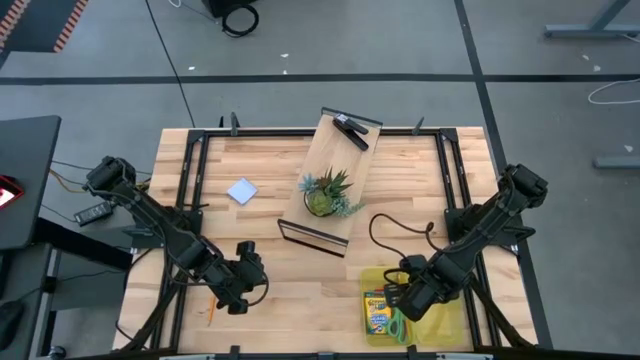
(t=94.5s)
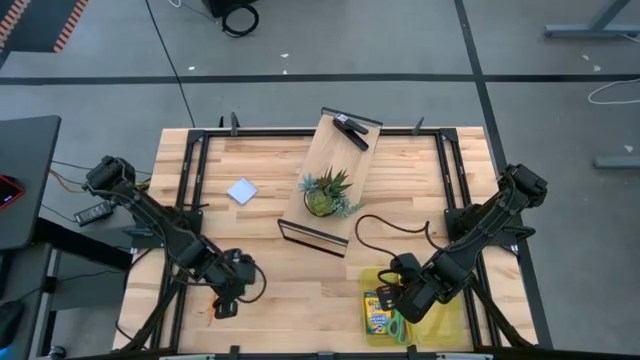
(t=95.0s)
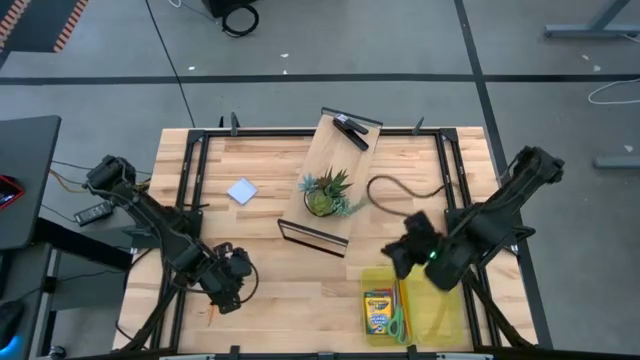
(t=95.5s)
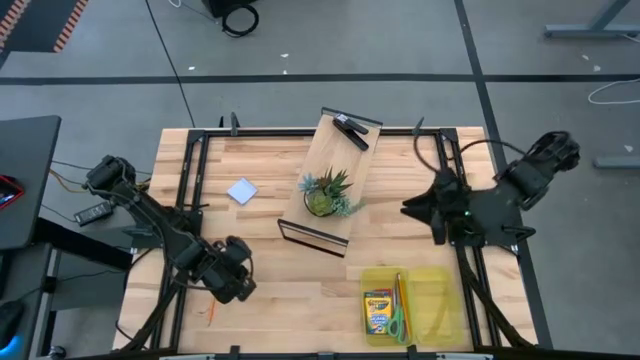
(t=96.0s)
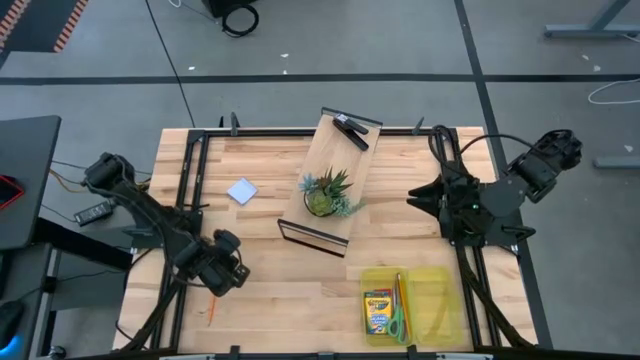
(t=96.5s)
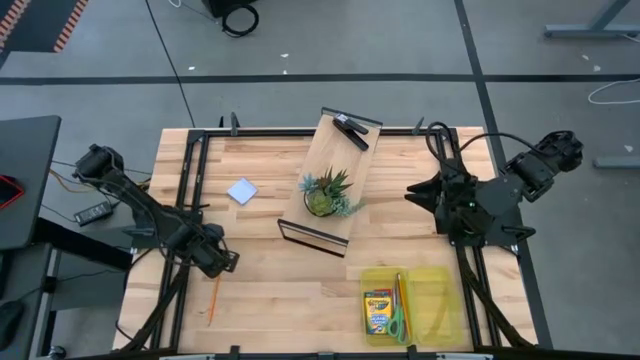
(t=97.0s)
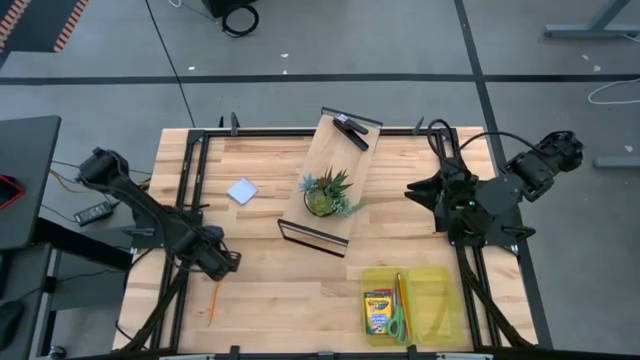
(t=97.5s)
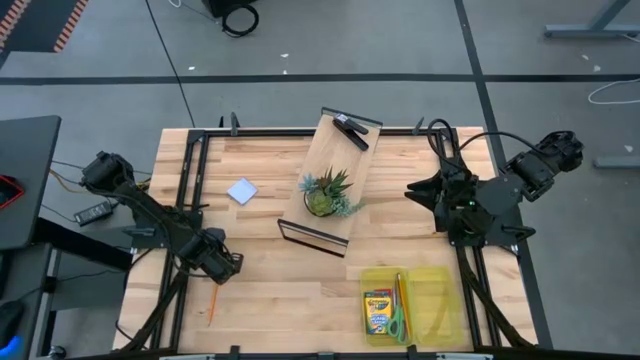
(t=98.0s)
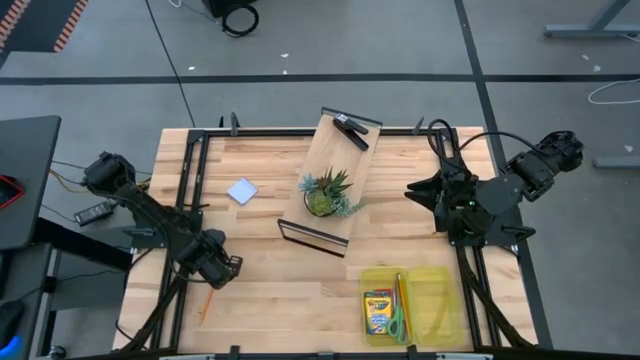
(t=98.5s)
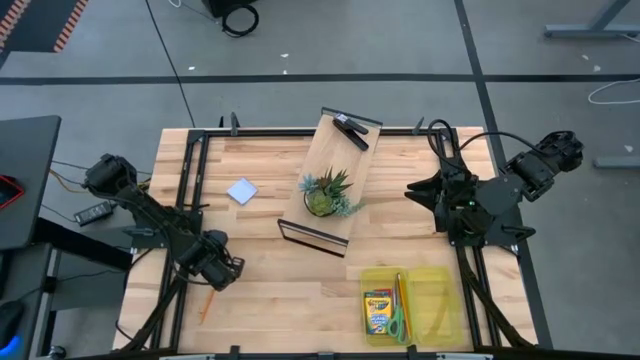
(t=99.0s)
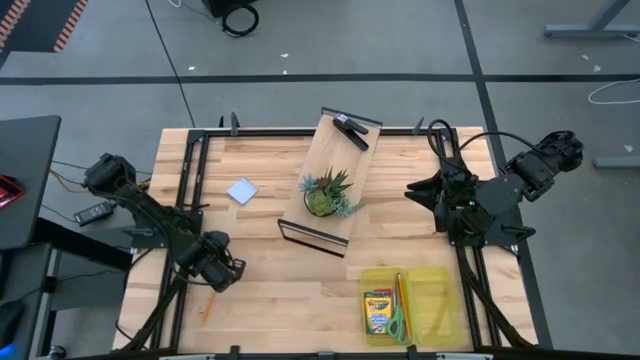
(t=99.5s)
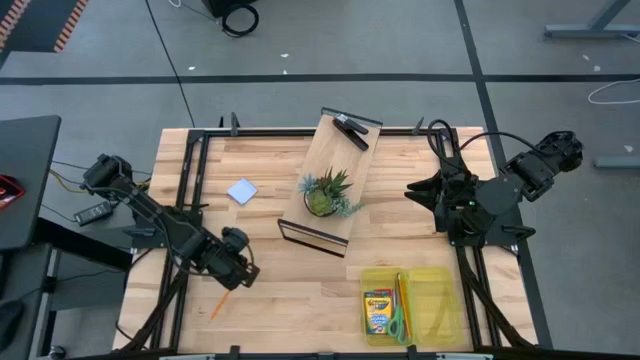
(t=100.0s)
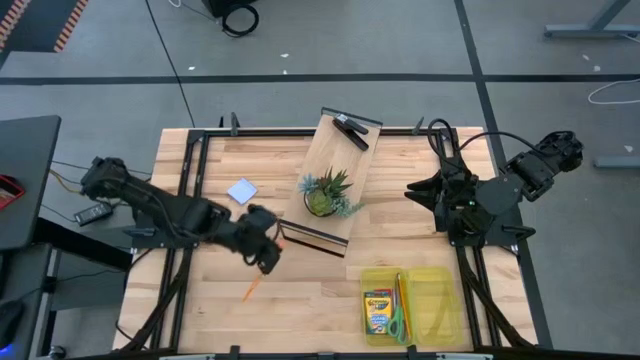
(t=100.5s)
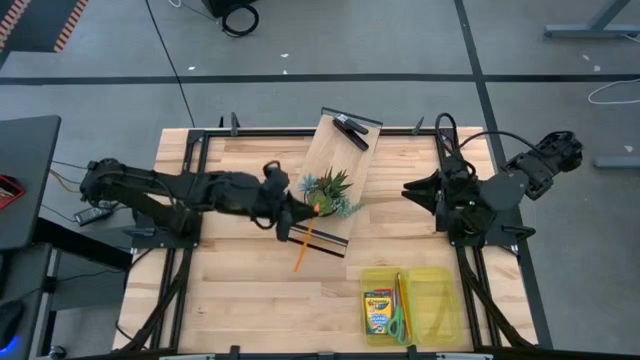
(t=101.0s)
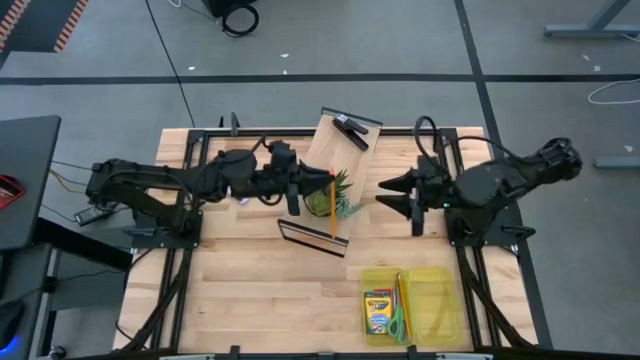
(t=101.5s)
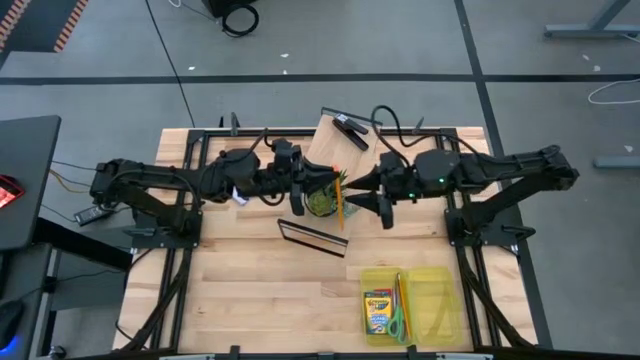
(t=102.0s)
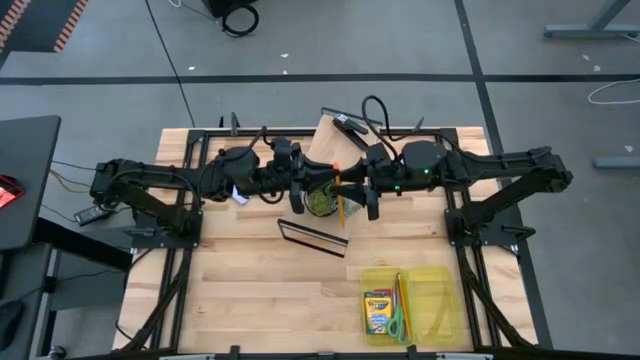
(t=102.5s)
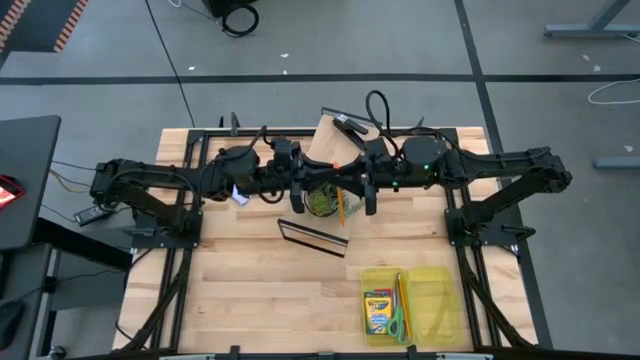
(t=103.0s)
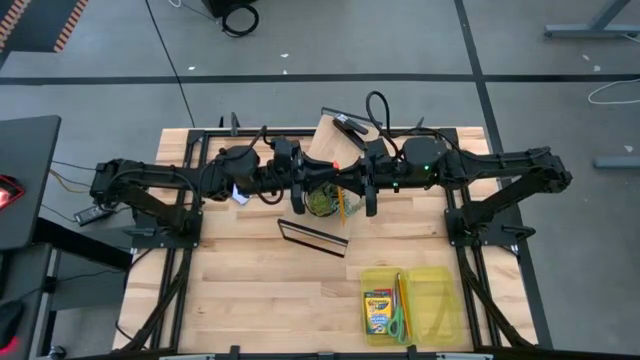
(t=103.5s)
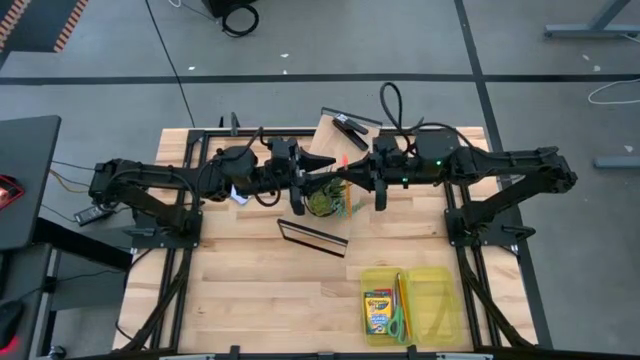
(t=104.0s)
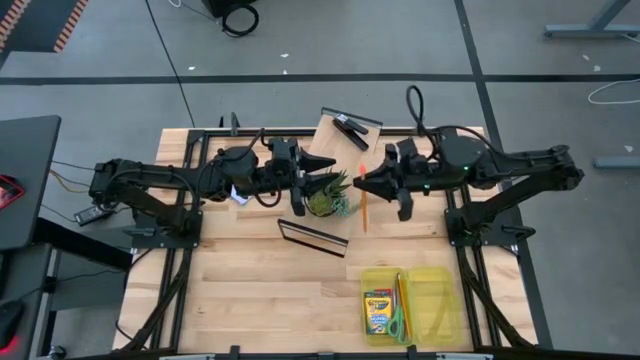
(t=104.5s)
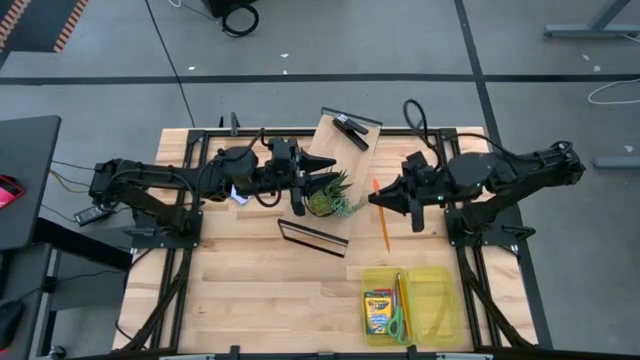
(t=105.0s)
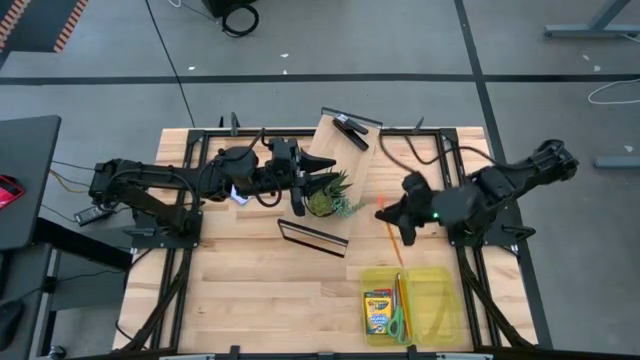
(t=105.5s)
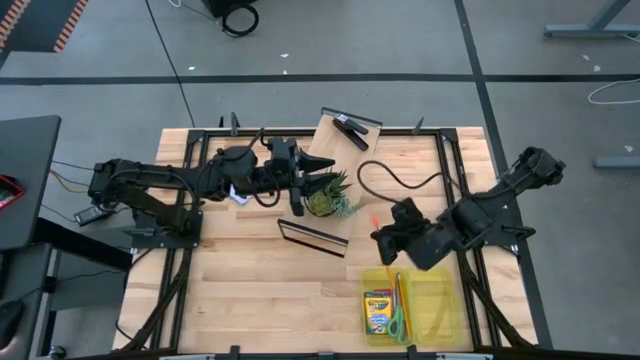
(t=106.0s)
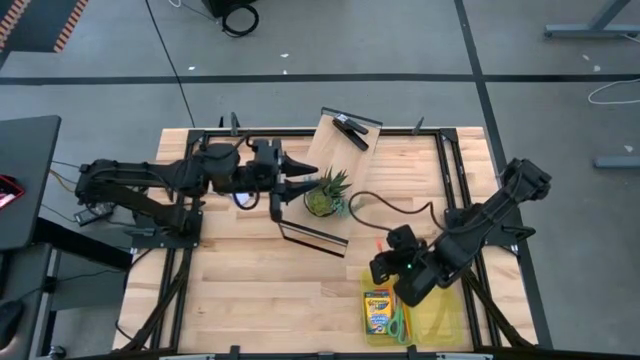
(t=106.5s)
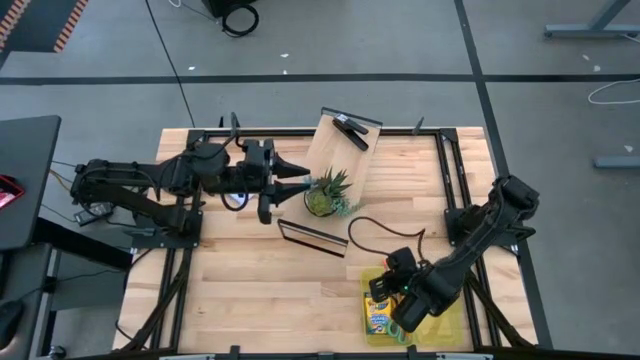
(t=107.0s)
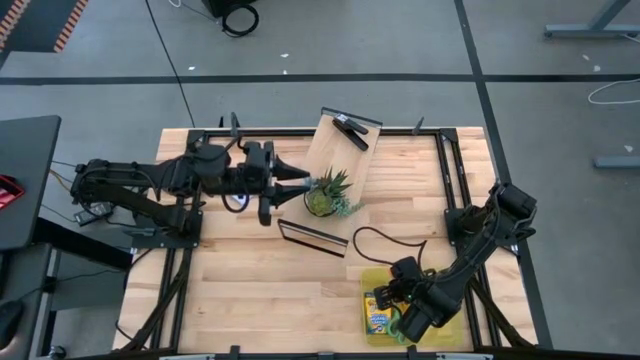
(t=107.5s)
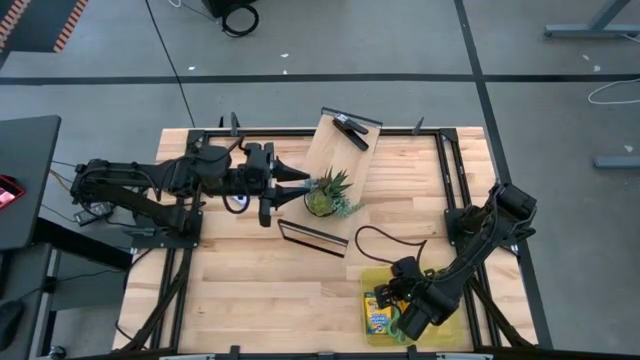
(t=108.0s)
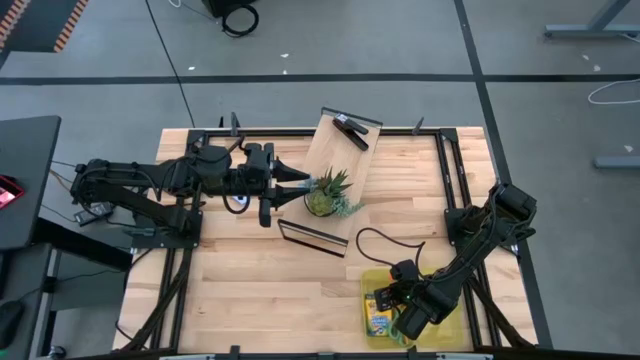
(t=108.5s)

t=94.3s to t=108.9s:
Task: Pack school essentials
Put the orange pencil into the yellow supply box

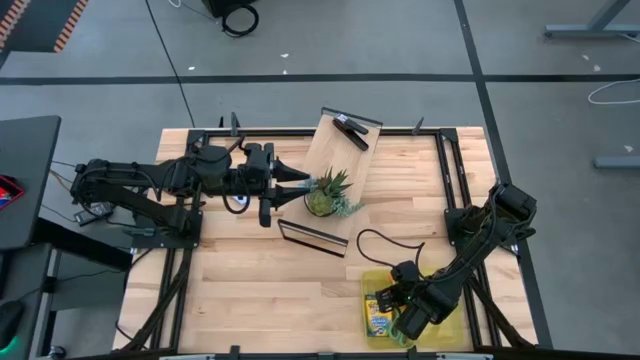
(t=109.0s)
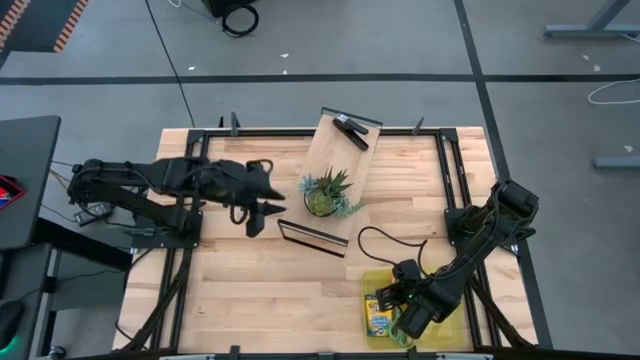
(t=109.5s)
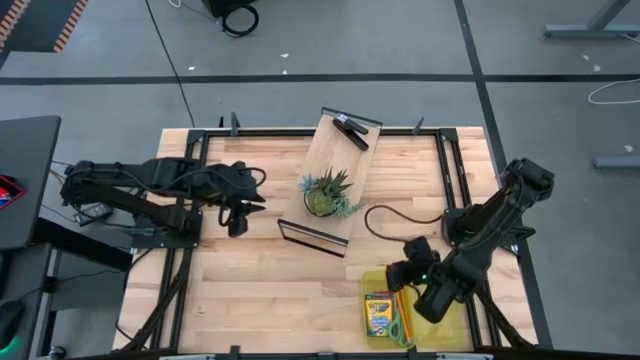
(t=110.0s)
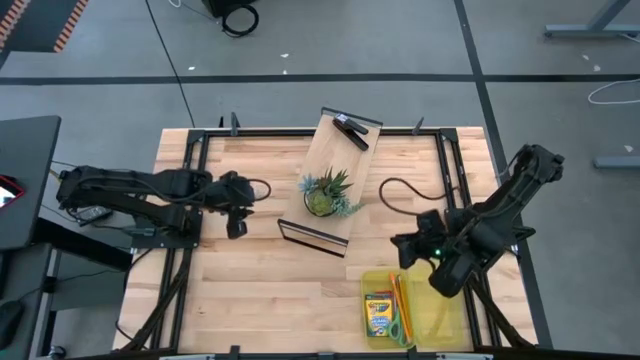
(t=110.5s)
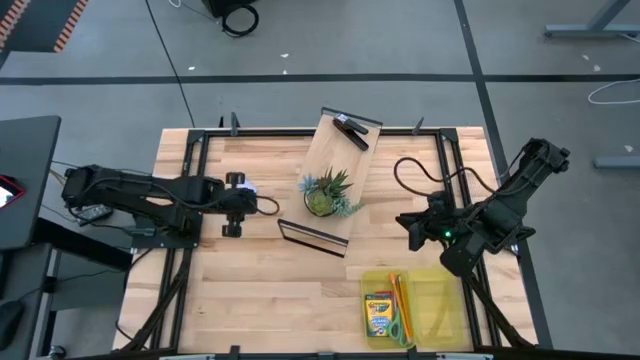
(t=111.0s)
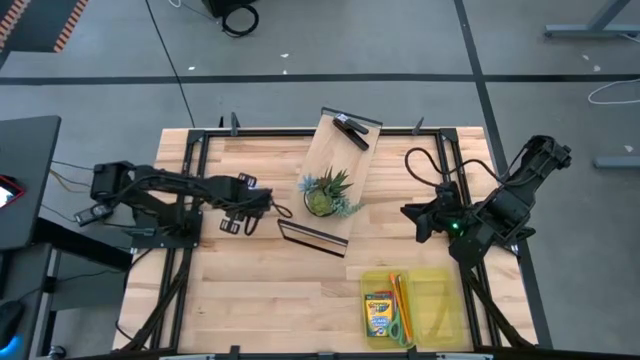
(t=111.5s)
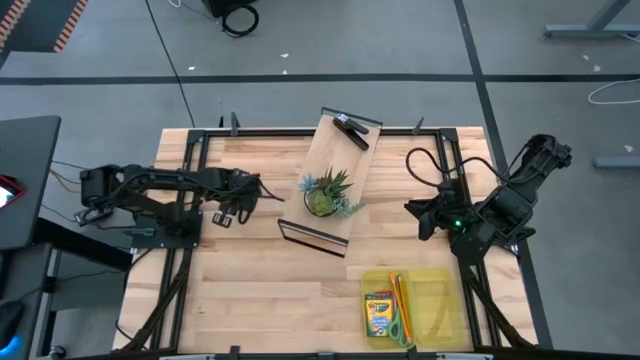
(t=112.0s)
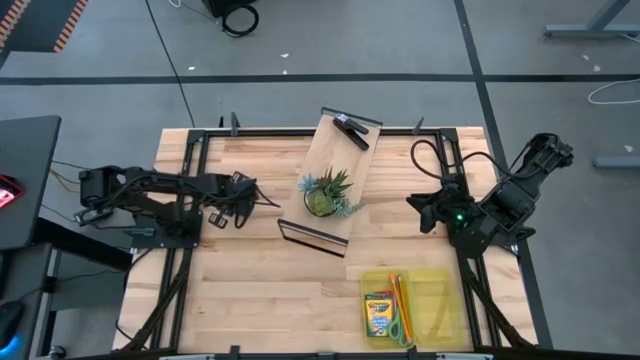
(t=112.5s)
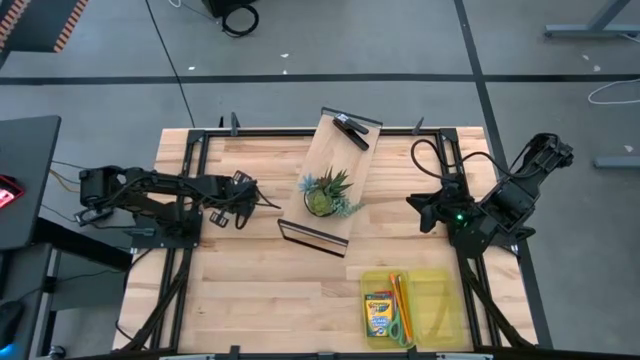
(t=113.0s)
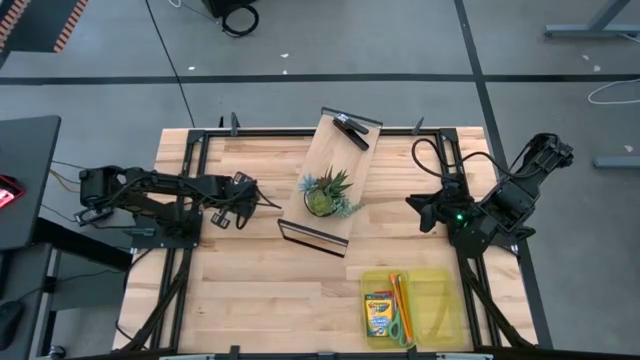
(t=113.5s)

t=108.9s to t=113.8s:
Put the white sticky note into the yellow supply box
